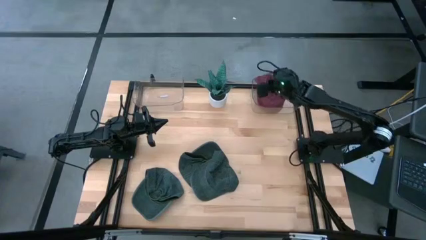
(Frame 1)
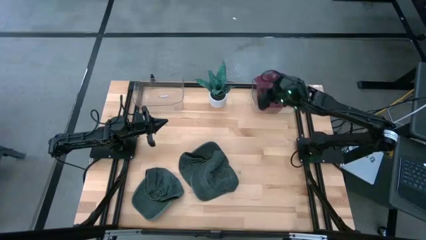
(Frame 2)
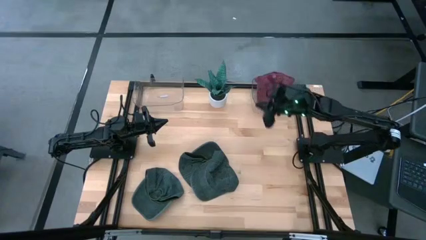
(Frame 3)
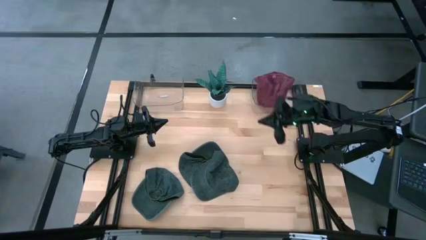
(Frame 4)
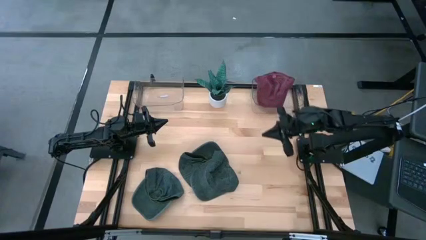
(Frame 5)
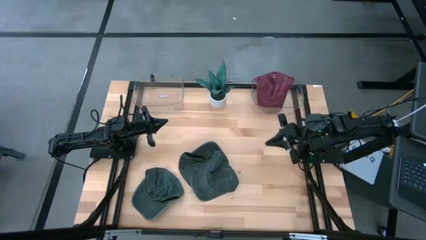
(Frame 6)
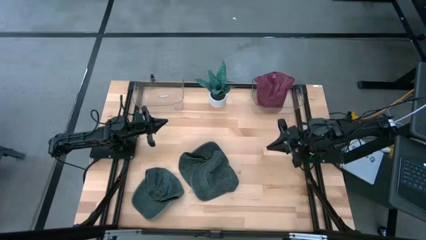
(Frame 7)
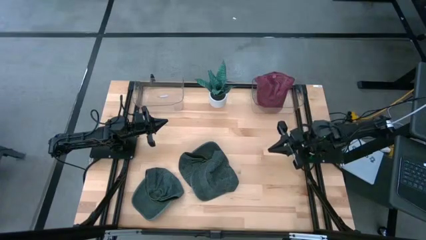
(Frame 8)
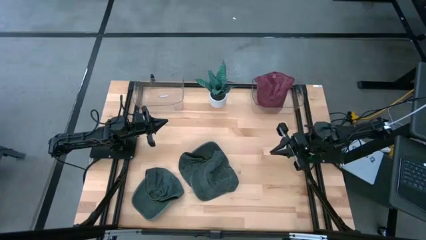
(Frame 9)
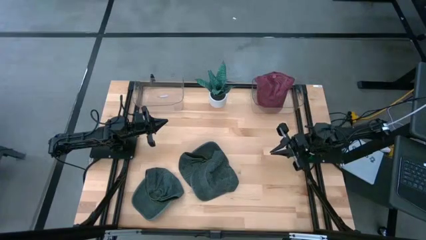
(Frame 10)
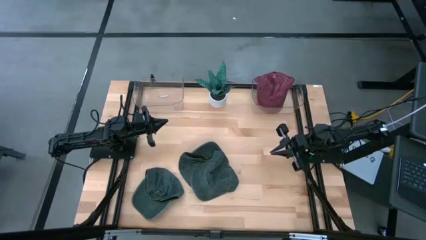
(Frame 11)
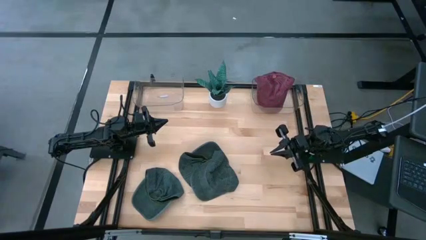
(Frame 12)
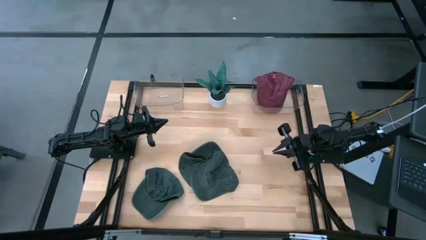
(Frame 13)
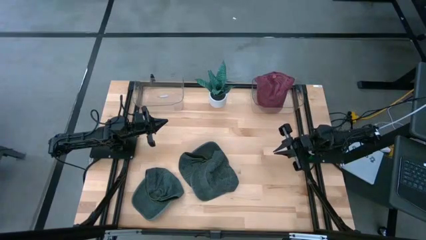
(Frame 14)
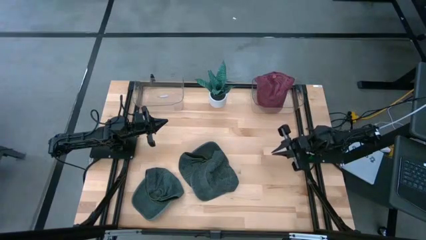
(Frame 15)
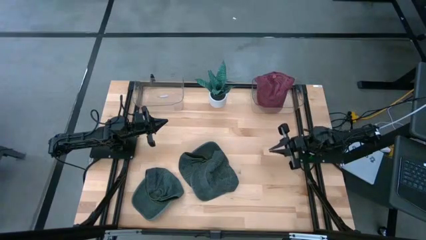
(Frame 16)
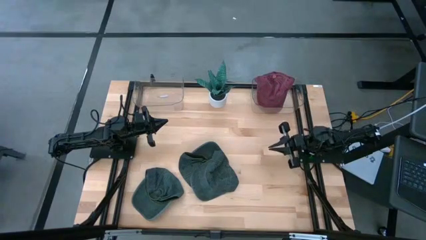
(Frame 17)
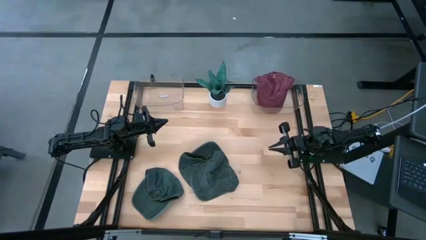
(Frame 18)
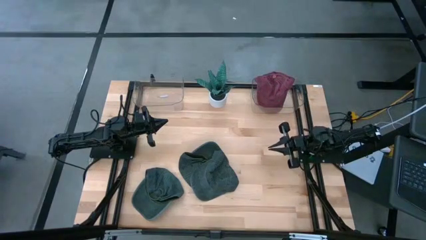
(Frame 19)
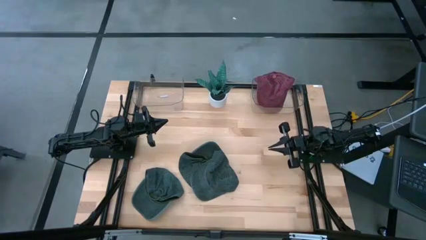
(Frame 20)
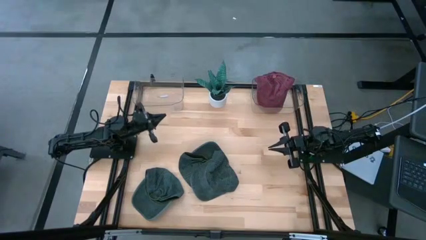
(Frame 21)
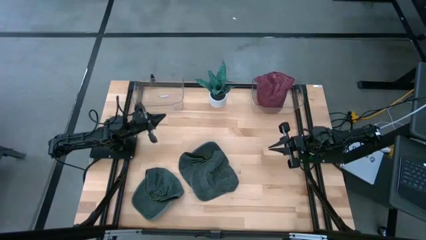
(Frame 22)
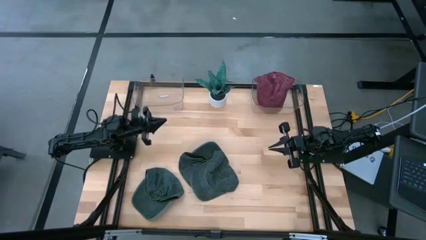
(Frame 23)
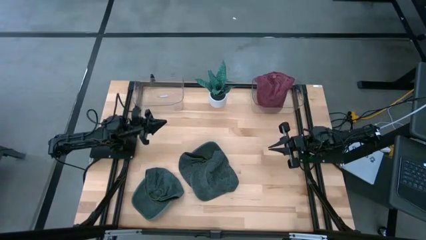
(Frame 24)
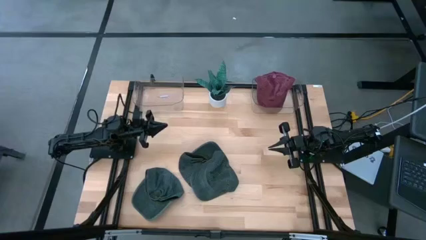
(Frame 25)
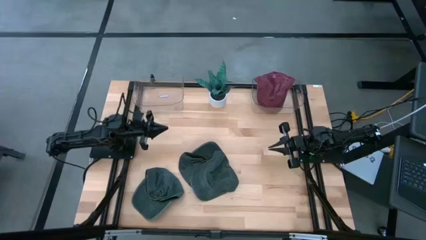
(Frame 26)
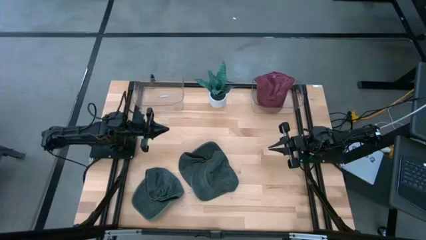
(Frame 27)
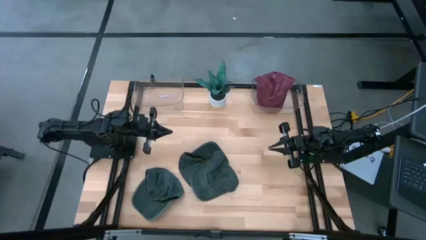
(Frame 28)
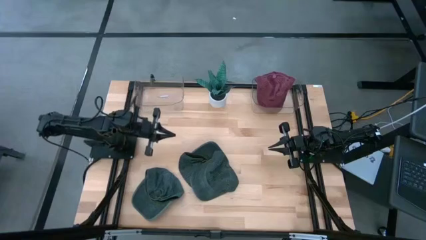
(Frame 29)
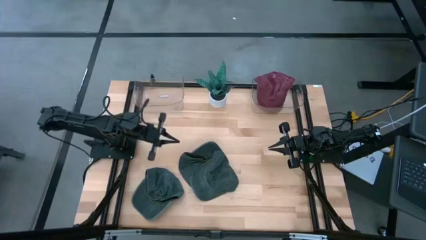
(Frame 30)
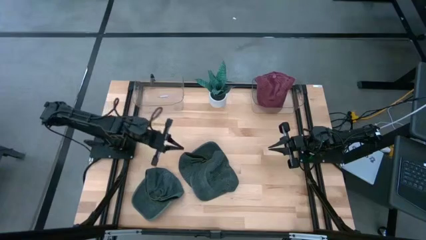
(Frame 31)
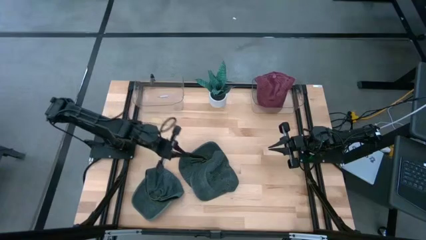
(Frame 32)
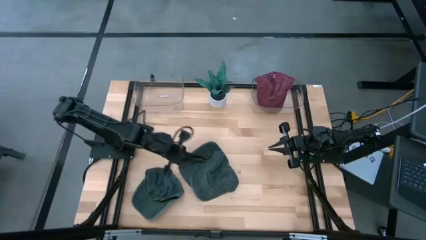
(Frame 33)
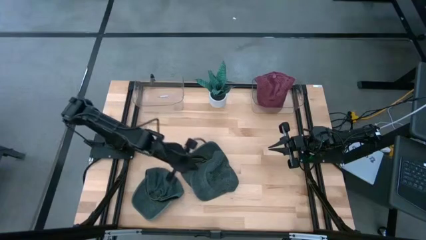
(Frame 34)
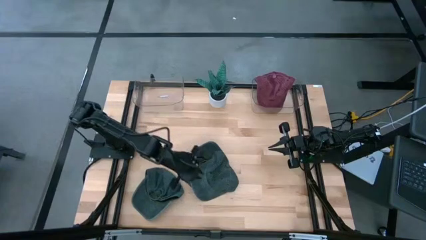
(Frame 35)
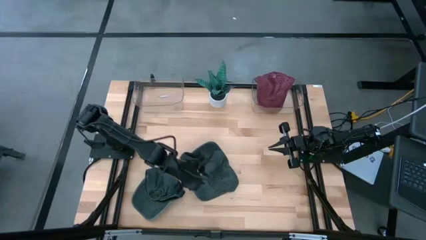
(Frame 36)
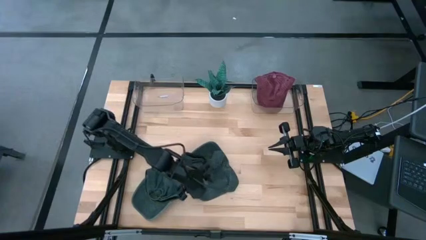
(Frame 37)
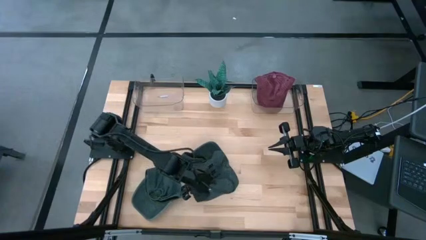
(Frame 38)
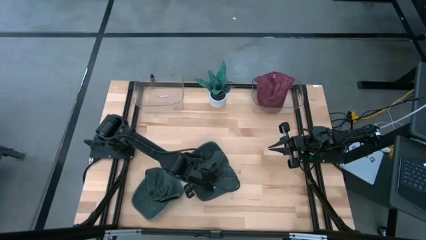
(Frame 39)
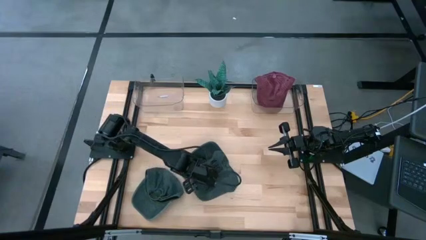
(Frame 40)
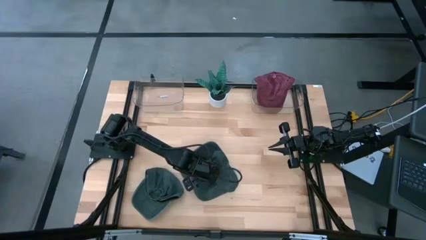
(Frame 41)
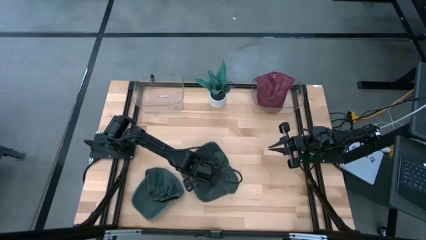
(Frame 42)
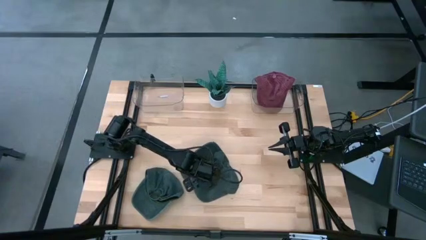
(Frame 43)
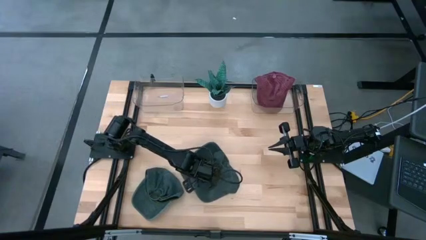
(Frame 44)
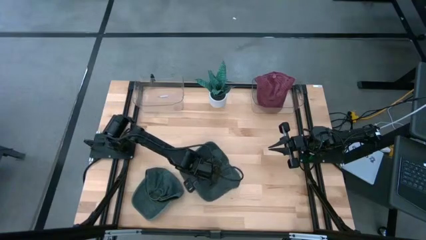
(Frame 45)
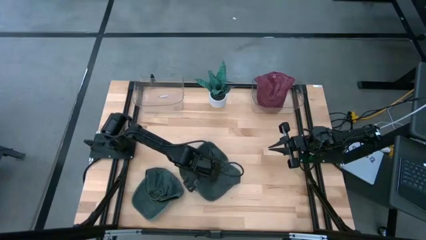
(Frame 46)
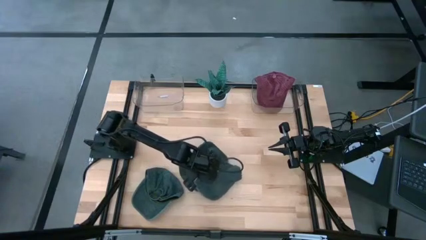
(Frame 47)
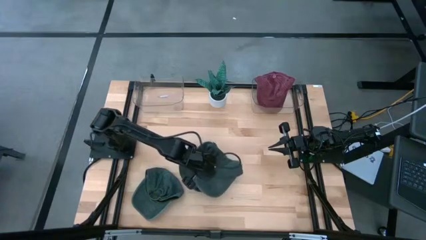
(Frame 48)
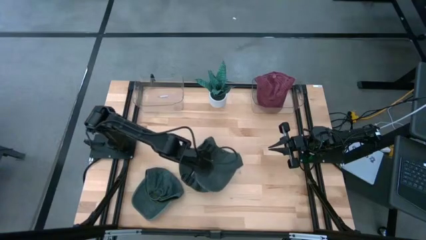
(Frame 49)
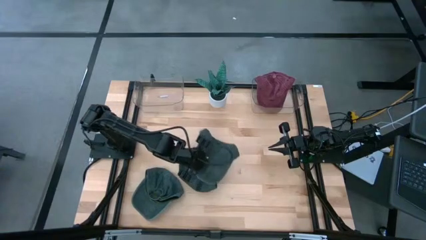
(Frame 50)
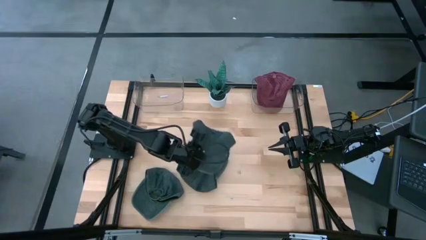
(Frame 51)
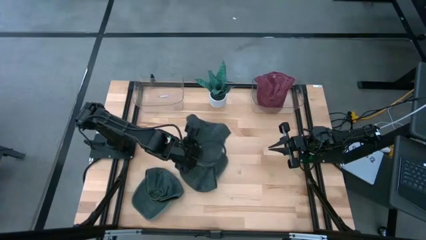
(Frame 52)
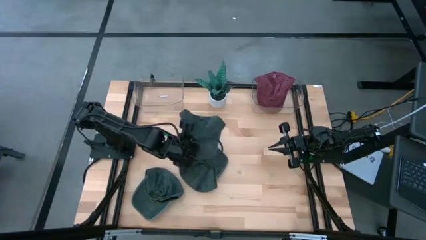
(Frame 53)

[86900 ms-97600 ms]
Task: Pick & Place hat
Put the right black cap into the left transparent bin

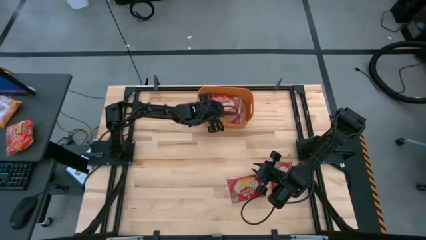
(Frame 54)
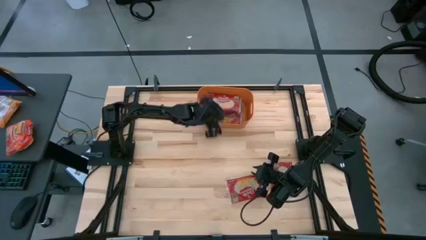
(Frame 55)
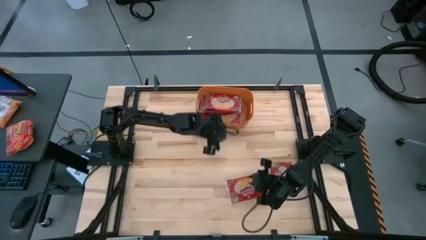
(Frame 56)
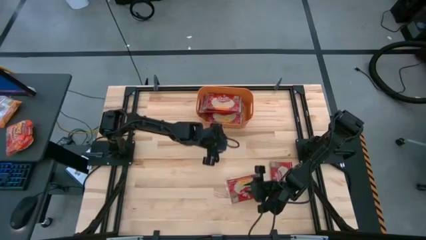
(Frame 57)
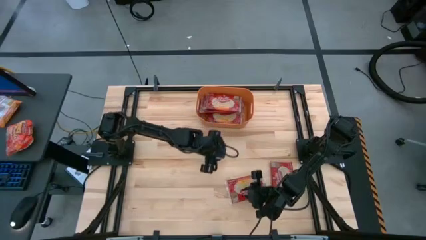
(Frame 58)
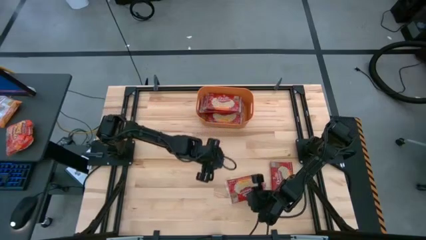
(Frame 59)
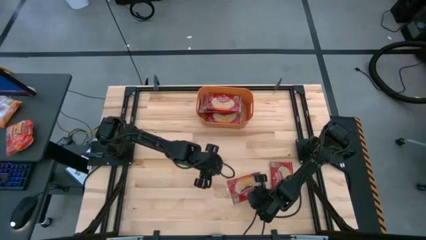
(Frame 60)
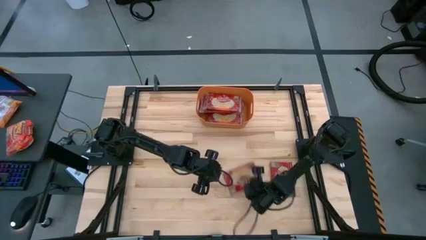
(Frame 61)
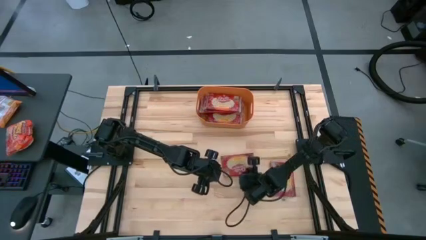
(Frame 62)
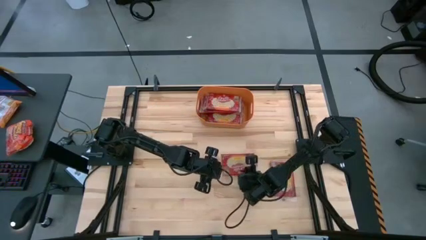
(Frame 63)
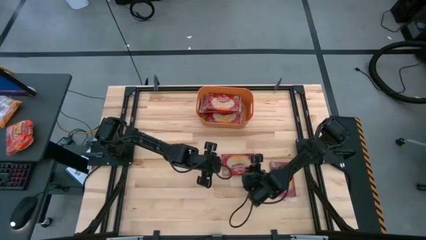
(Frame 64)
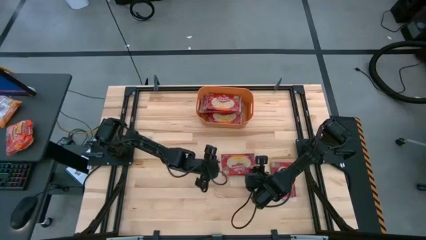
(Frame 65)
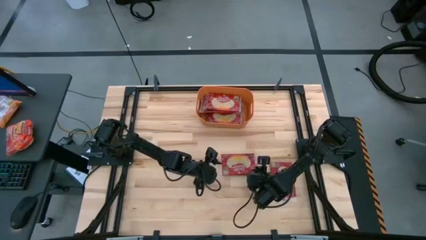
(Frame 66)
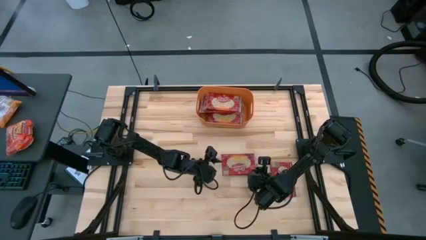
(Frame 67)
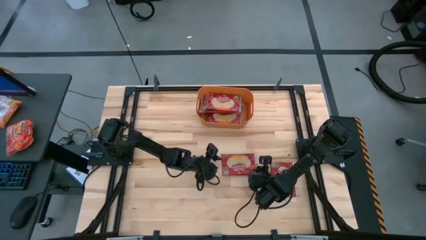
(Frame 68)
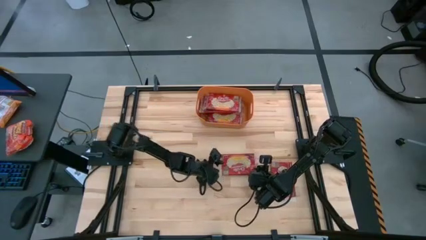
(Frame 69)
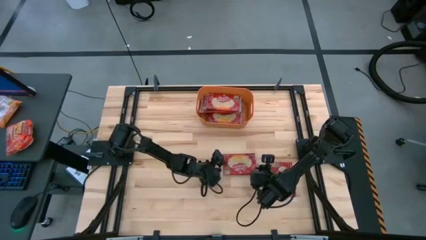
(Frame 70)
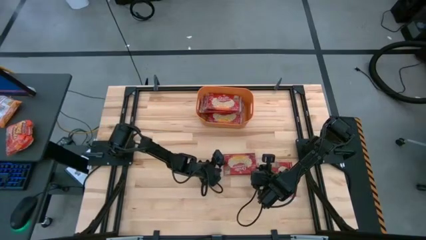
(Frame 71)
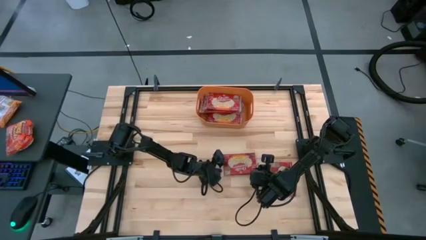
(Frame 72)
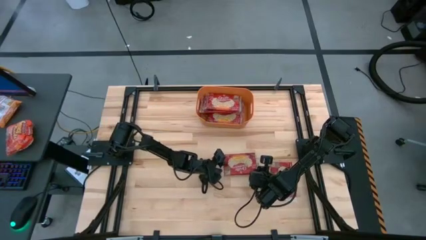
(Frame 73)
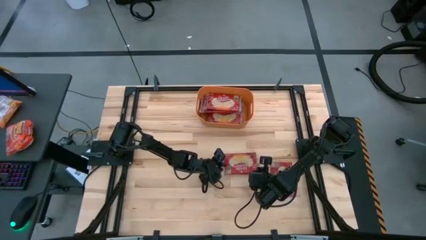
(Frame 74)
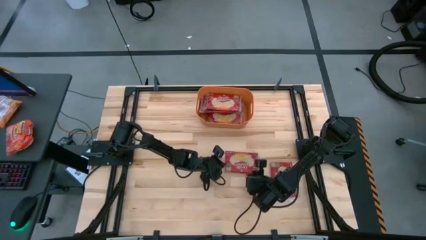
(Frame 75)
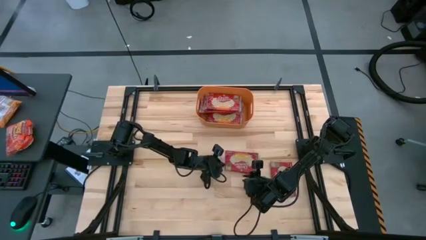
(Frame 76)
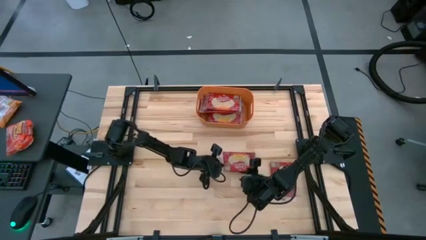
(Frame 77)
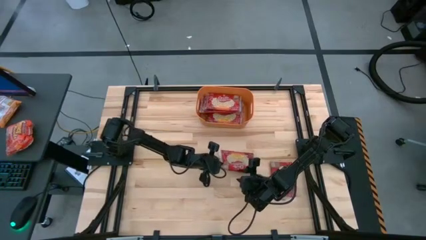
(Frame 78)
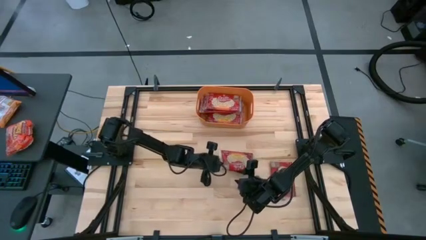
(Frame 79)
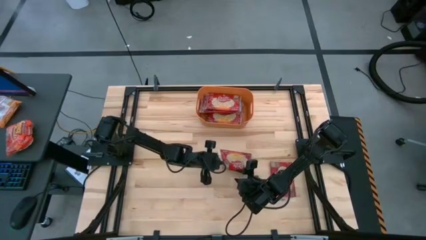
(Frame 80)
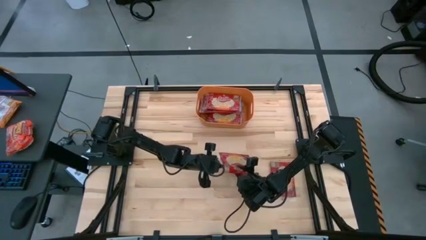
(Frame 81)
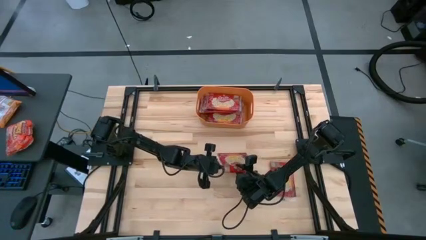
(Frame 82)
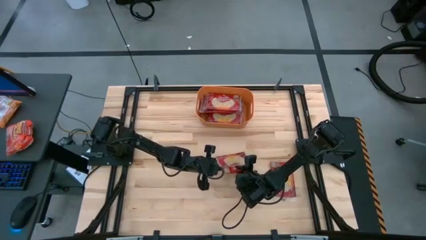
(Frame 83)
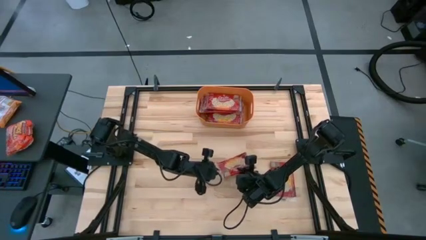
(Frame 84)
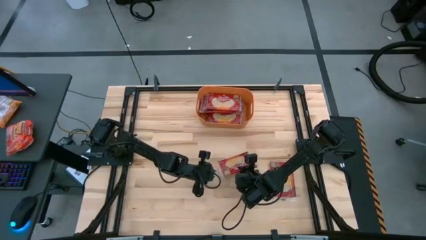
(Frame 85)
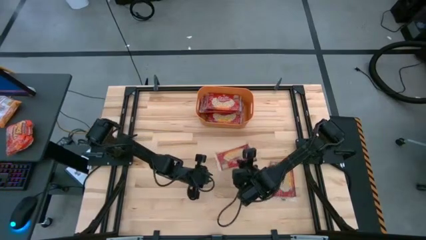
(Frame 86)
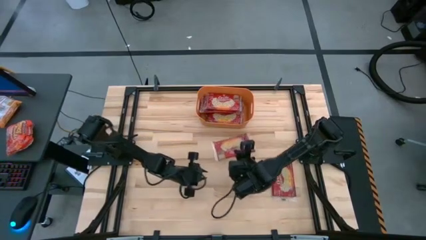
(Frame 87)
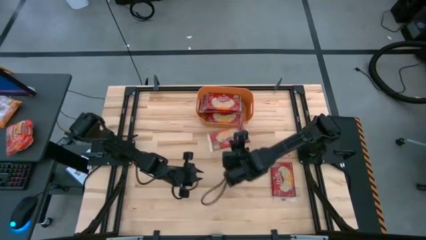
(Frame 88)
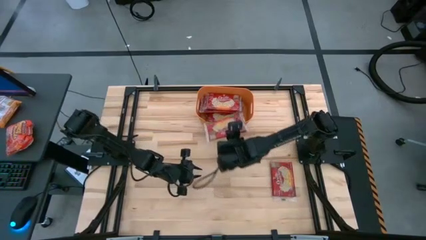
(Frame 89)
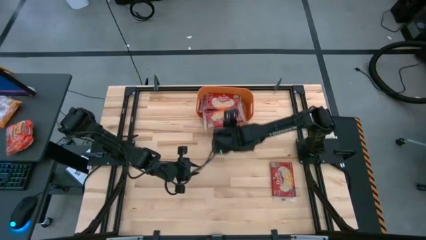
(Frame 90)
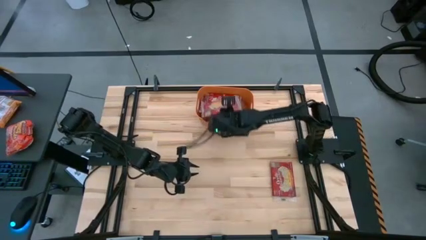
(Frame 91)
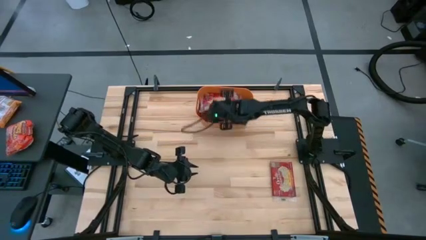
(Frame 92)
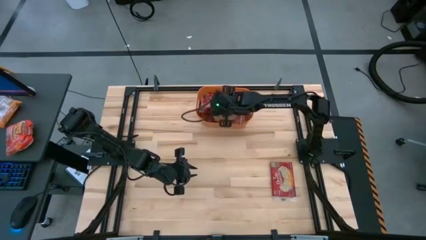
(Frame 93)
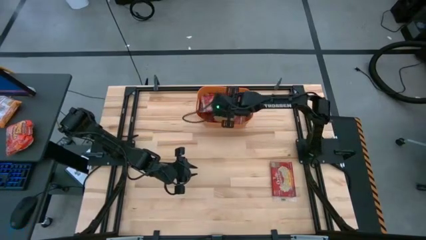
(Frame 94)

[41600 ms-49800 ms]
Task: Sort popcorn bags into baskets
Put the red popcorn bag into the orange bin
